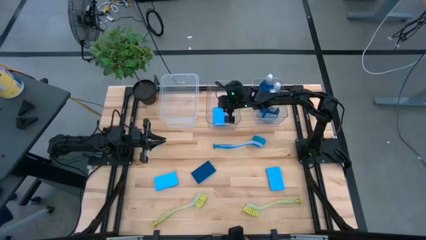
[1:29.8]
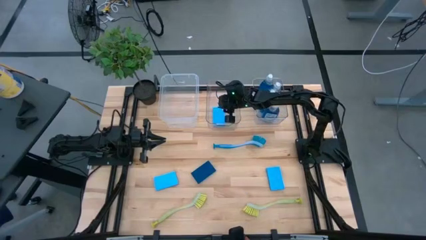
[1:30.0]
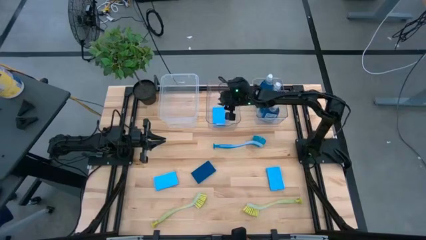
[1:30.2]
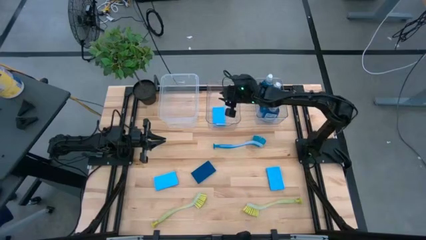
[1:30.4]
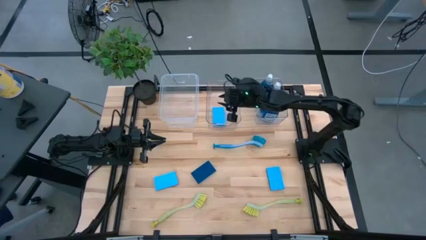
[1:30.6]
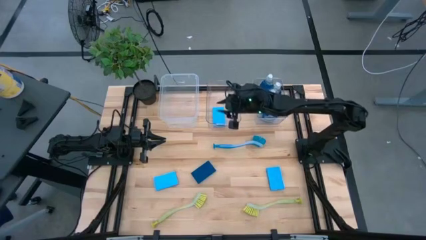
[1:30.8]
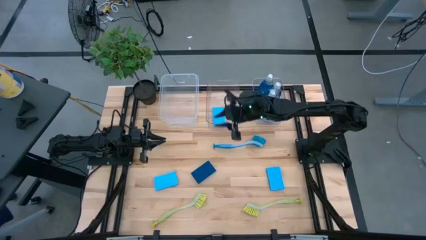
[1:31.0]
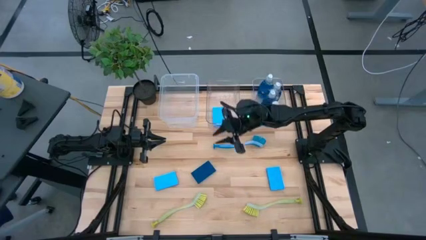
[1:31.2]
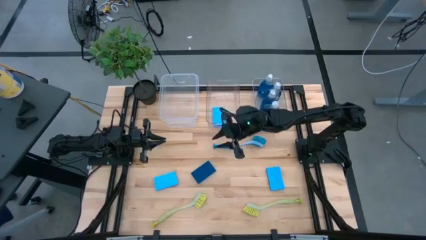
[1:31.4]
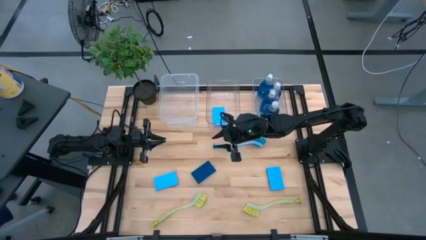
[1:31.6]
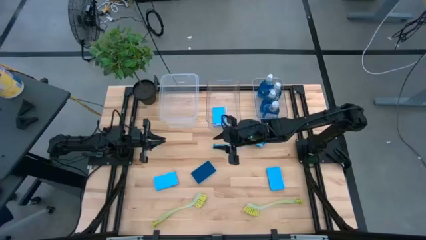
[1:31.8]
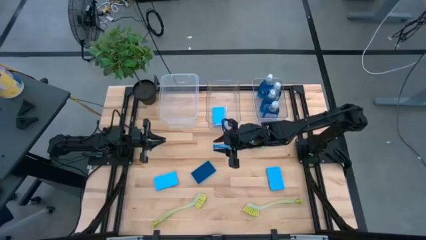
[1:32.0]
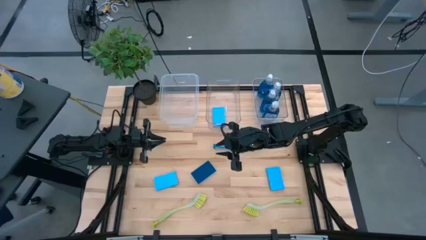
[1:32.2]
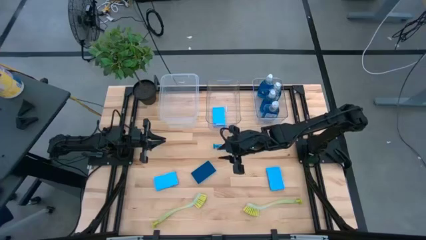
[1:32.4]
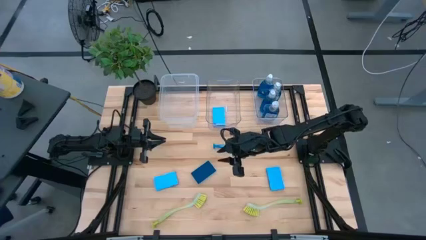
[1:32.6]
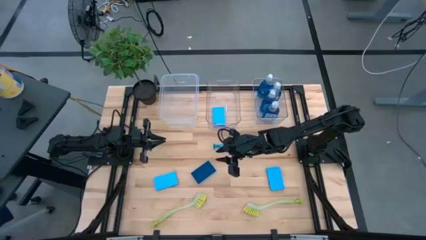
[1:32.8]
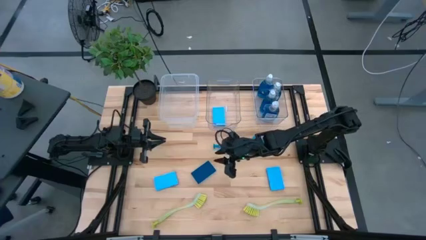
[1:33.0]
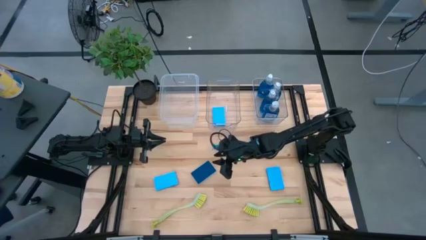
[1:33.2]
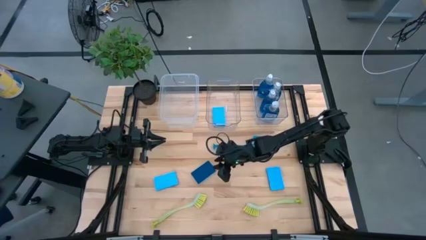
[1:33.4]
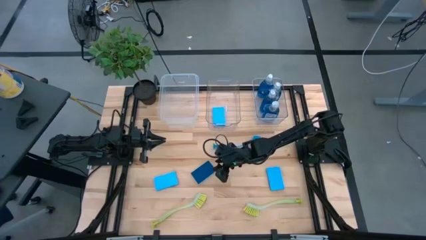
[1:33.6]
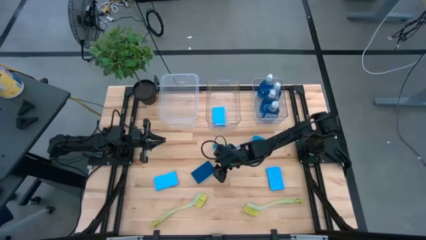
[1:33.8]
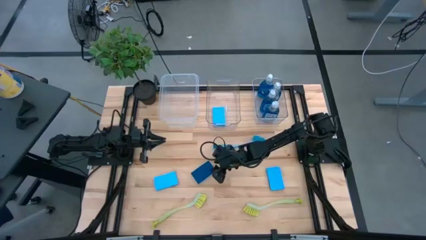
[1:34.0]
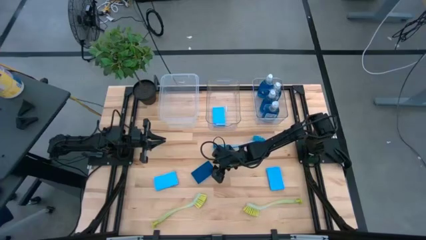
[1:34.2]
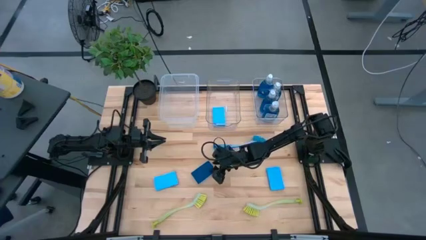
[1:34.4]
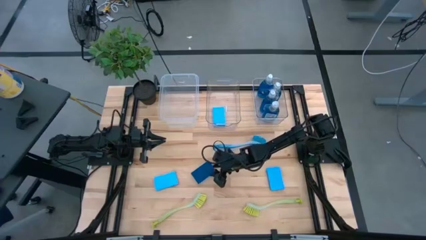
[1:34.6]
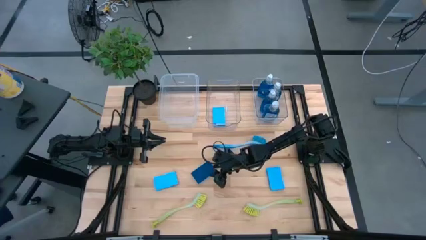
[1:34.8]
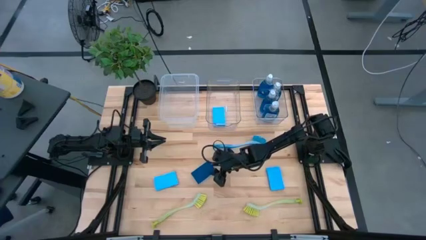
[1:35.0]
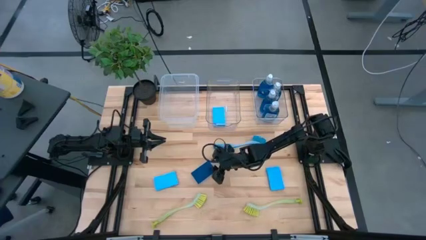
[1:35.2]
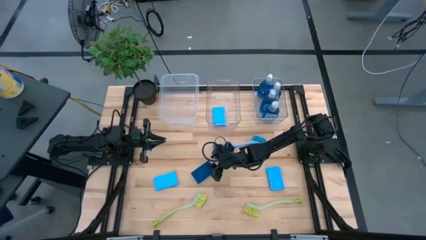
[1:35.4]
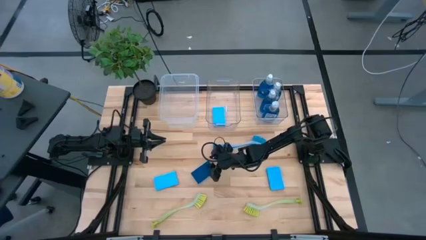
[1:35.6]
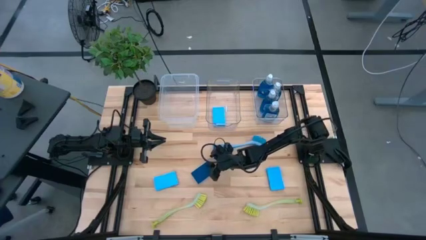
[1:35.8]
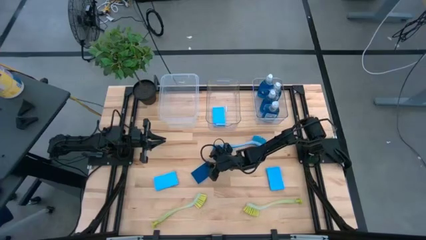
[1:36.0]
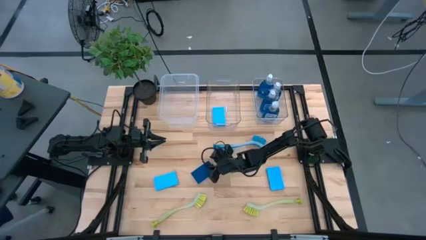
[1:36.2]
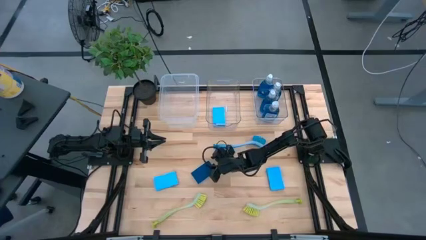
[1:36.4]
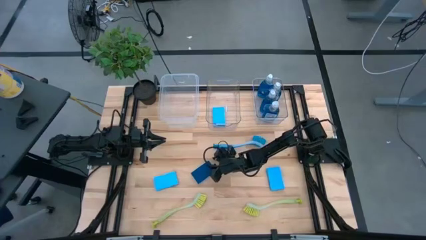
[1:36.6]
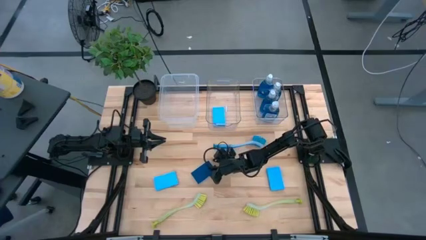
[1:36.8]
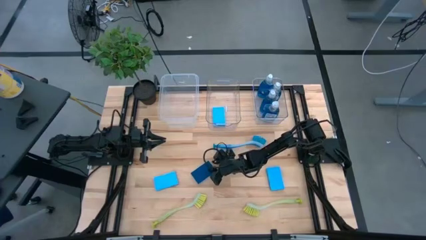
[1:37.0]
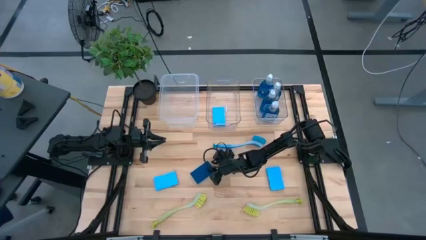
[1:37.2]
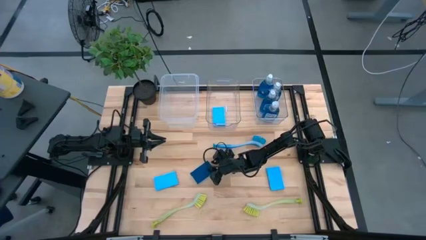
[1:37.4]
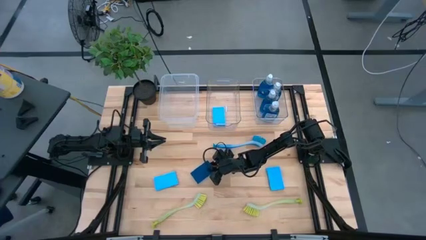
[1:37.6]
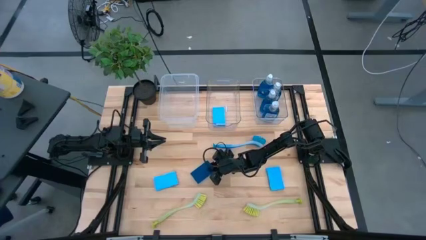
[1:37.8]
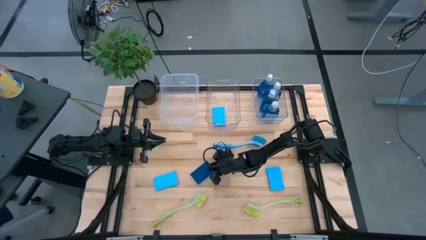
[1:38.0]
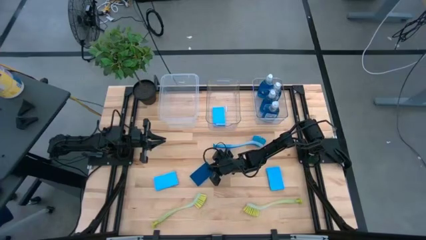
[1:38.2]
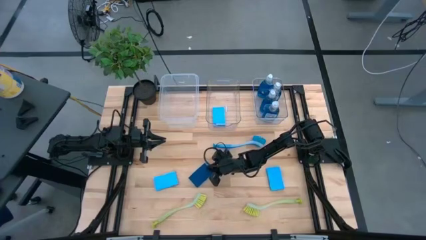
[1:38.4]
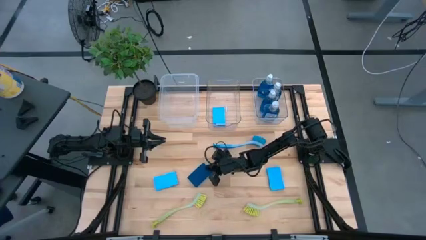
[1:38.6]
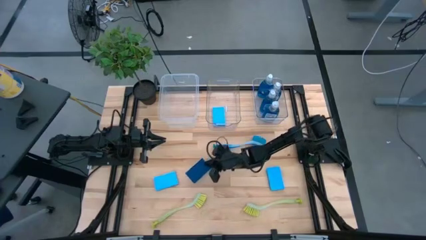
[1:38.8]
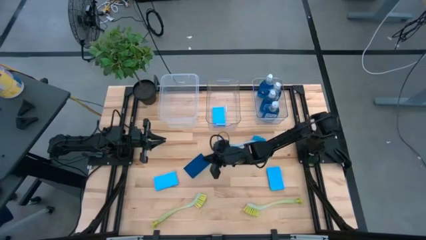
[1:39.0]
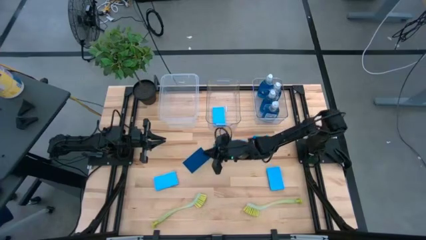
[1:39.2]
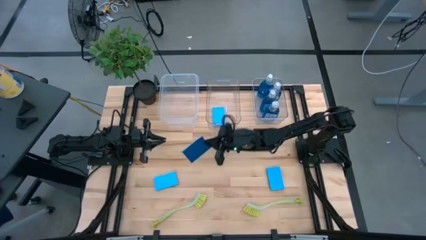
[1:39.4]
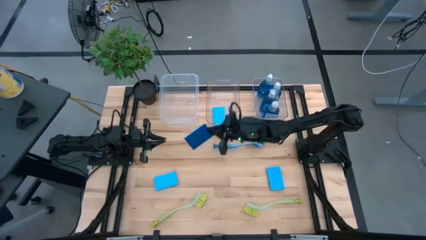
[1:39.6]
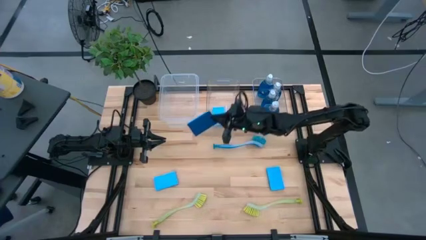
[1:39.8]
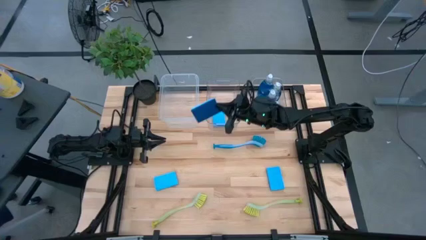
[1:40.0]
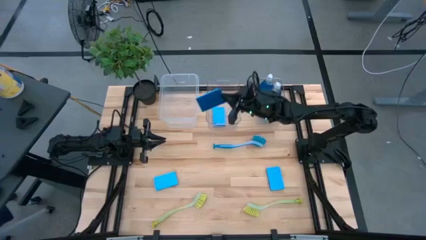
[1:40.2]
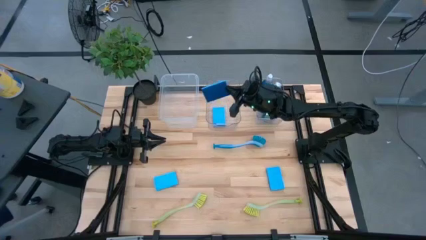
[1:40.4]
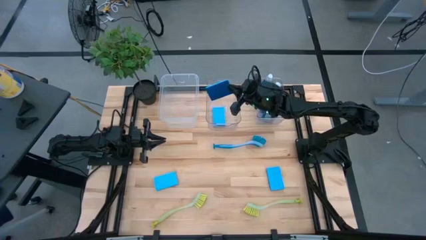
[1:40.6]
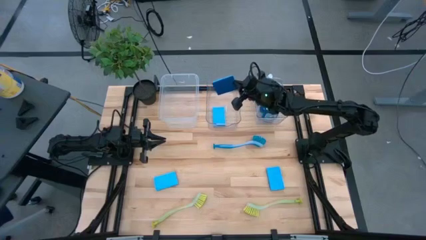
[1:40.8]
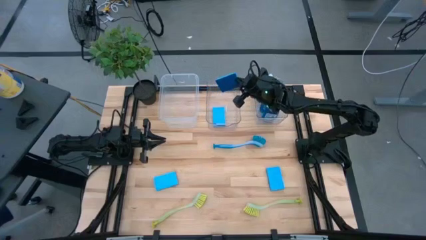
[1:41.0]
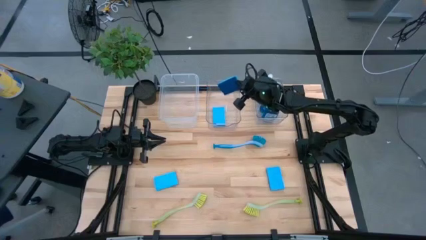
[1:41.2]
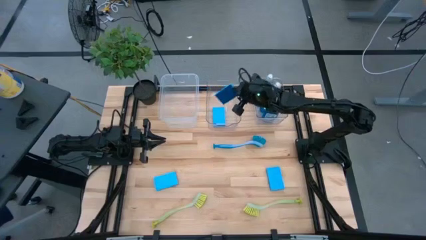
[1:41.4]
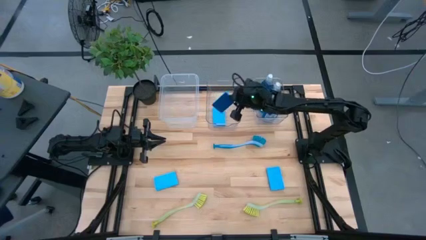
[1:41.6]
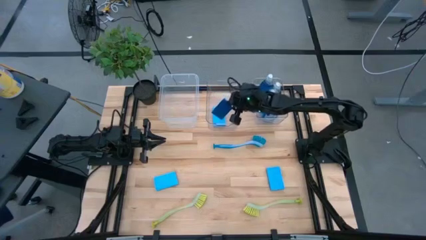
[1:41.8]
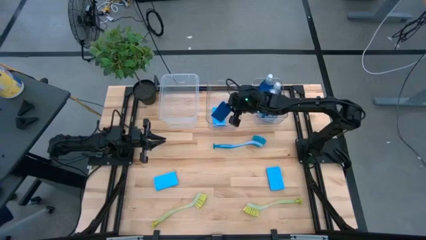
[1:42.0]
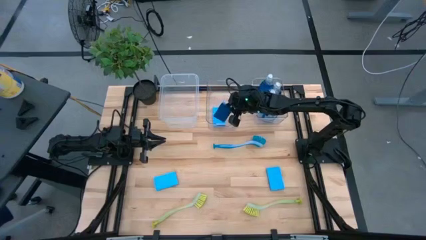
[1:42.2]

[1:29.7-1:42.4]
Task: Pick & Place Kitchen Sink Supplies
Put the blue sponge into the middle transparent bin

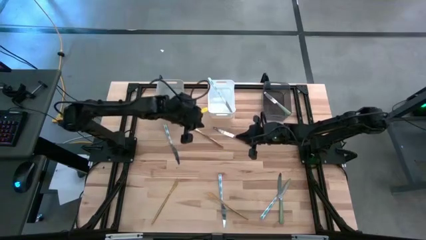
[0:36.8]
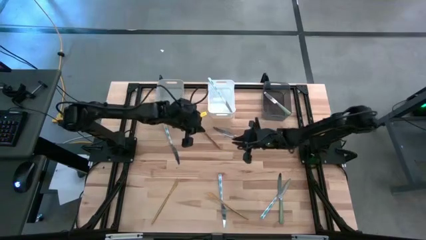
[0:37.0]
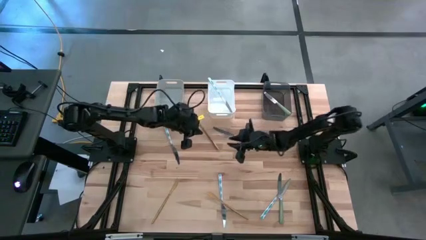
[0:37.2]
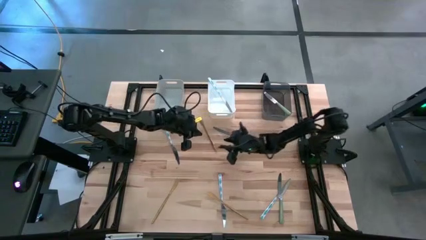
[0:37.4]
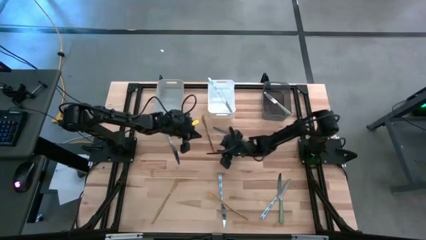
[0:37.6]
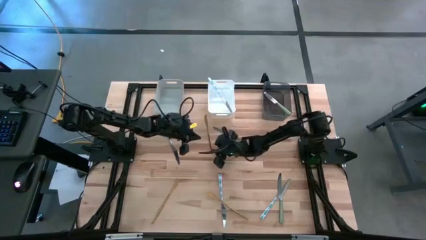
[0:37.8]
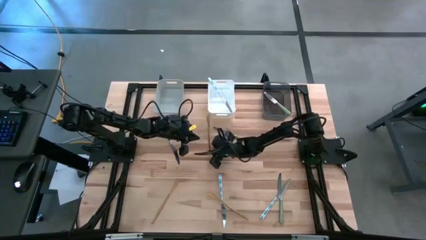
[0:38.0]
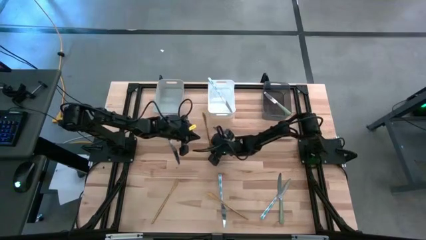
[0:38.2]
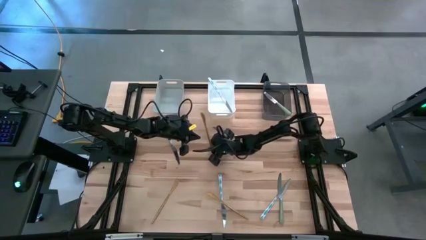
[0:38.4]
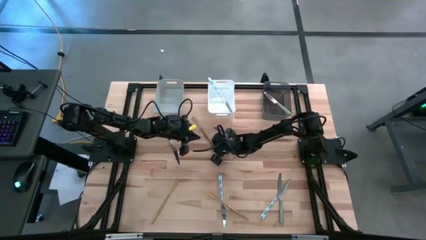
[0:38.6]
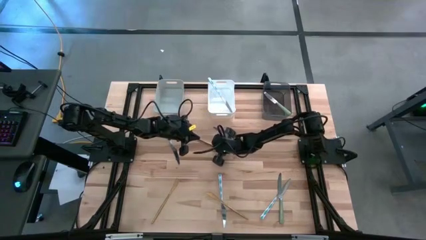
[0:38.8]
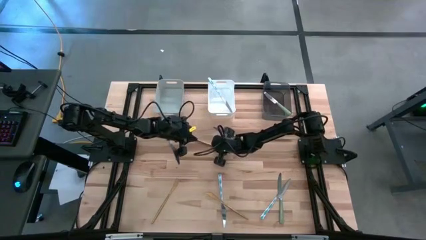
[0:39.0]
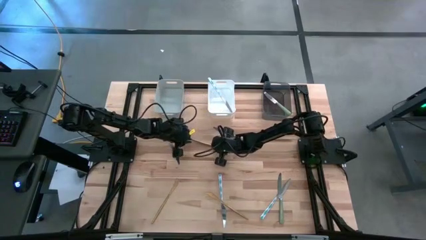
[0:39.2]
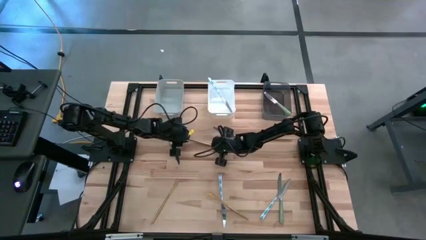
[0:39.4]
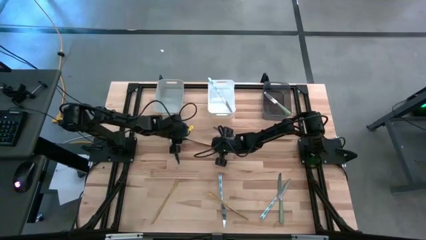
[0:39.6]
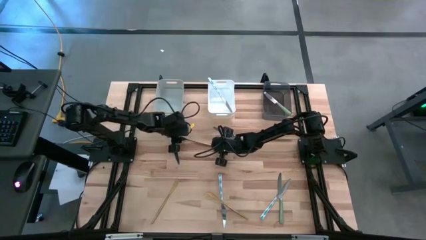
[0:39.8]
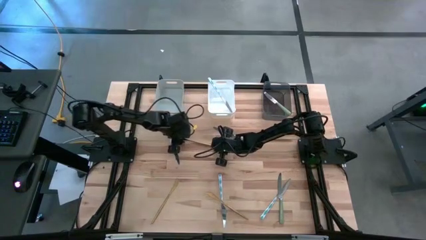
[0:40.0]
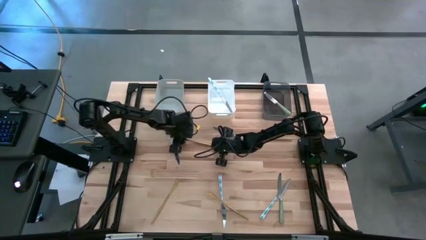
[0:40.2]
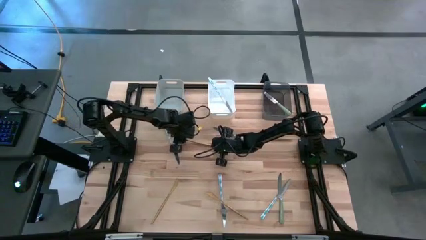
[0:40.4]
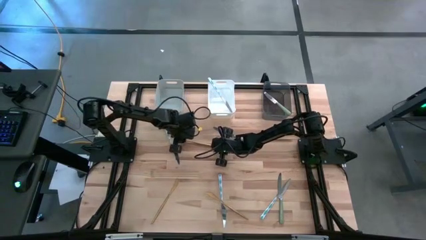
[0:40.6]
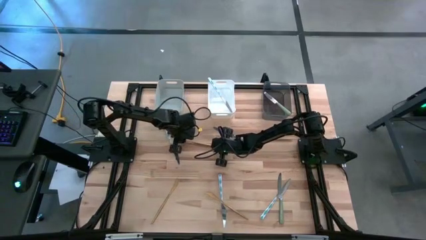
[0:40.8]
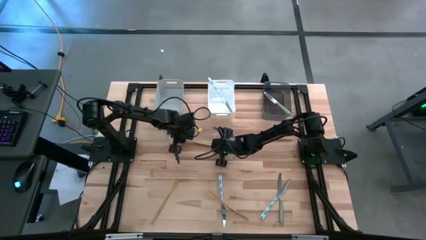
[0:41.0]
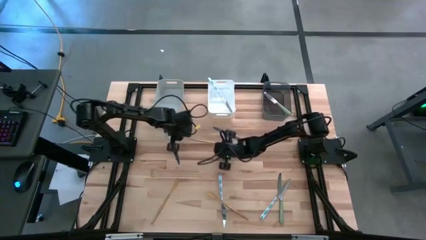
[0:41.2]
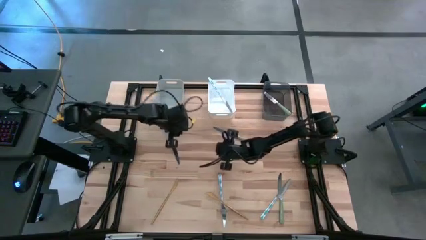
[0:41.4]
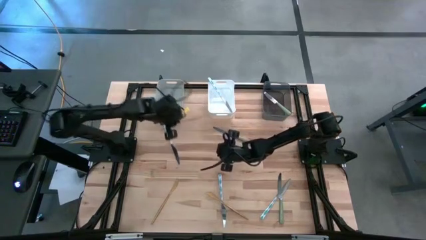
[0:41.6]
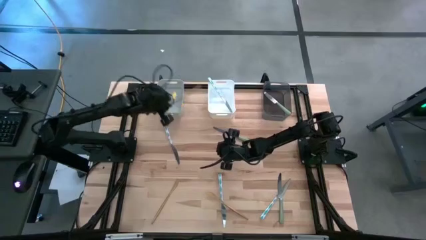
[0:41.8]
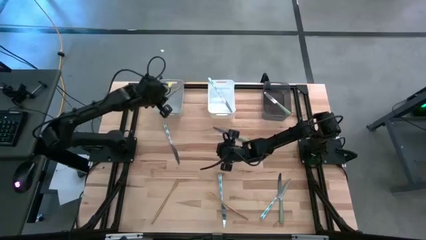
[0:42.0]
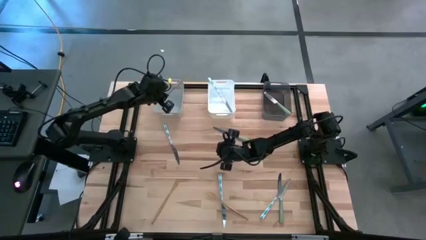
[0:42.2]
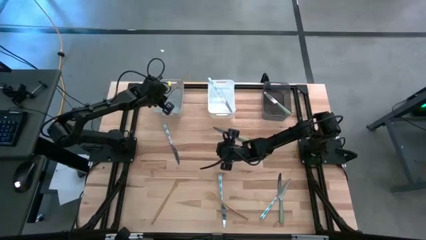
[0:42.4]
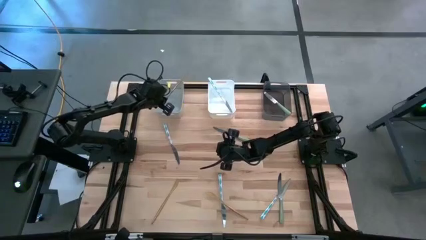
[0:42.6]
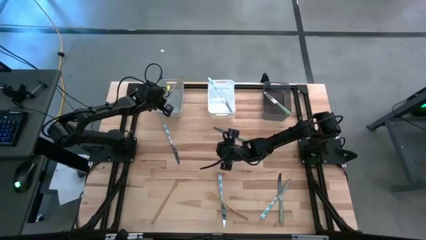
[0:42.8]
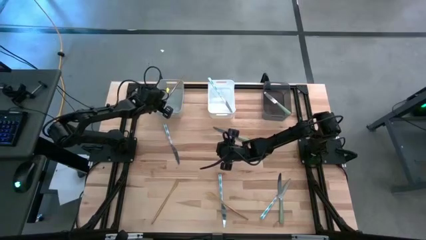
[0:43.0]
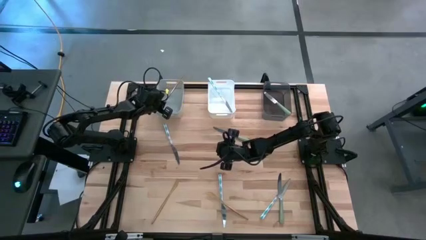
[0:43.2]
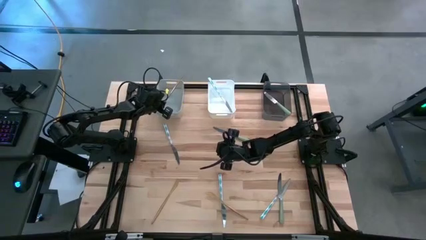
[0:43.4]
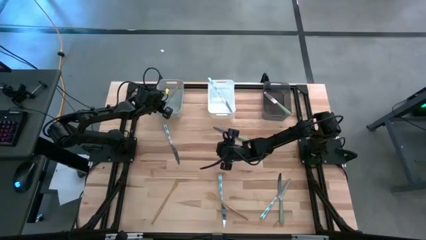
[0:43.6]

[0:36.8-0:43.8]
Task: Sort silverware by color (type)
Put the top left gold table knife into the gray bin
